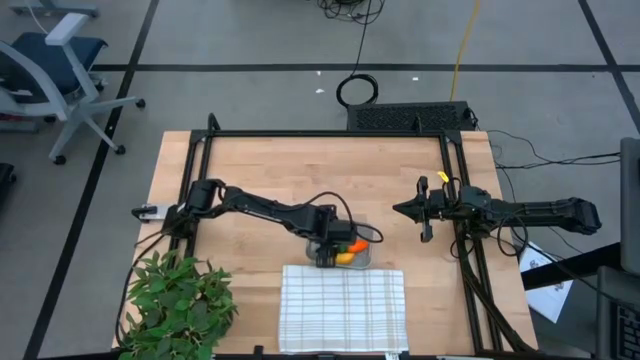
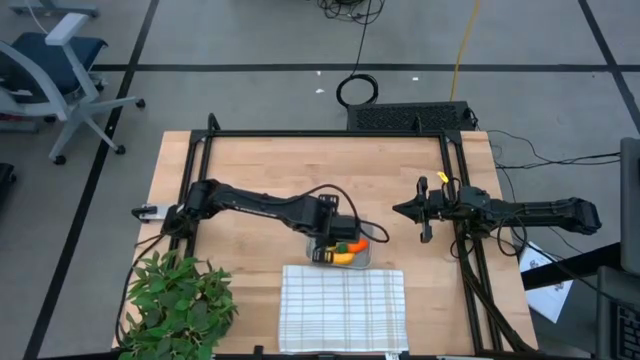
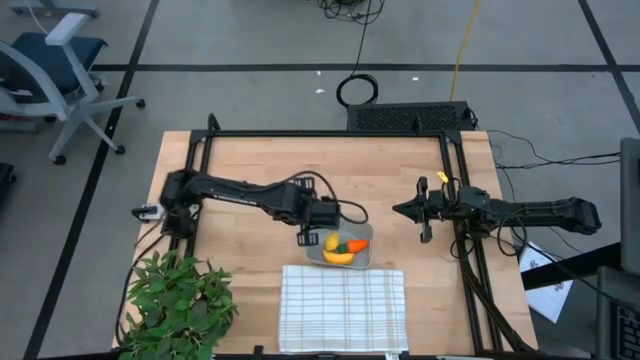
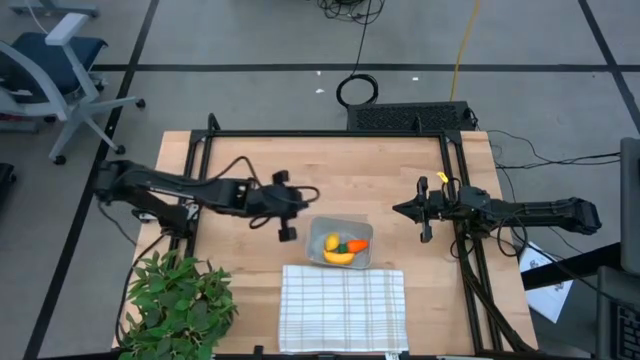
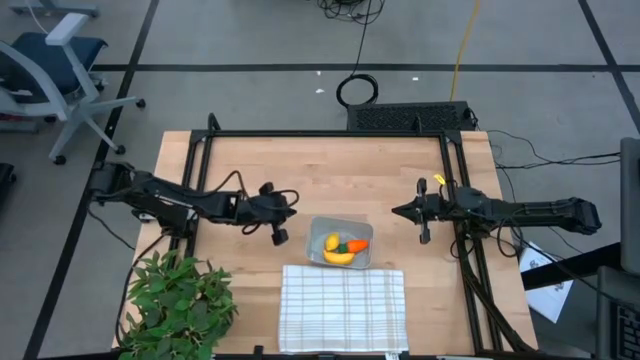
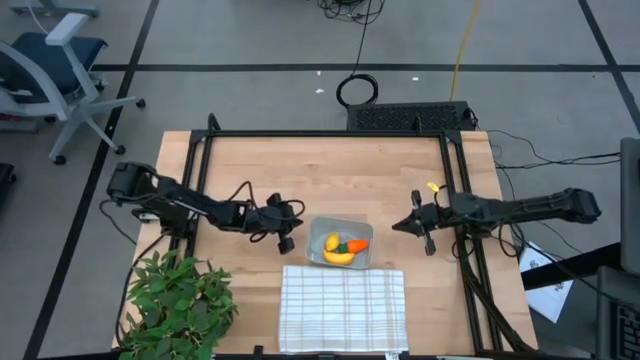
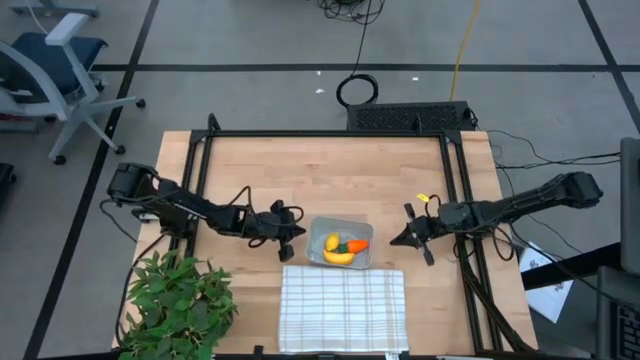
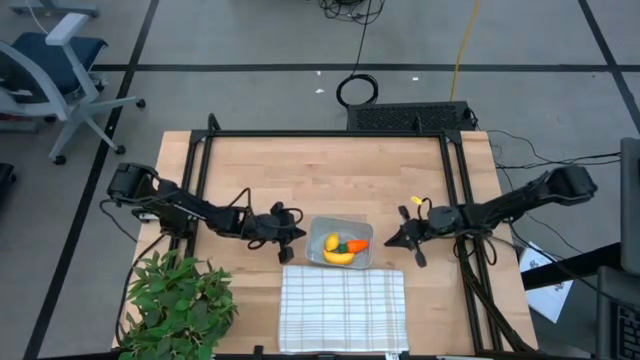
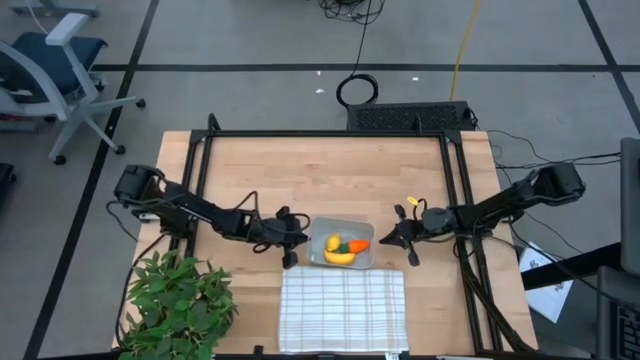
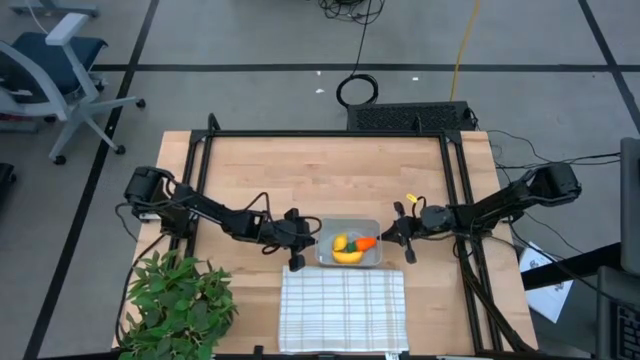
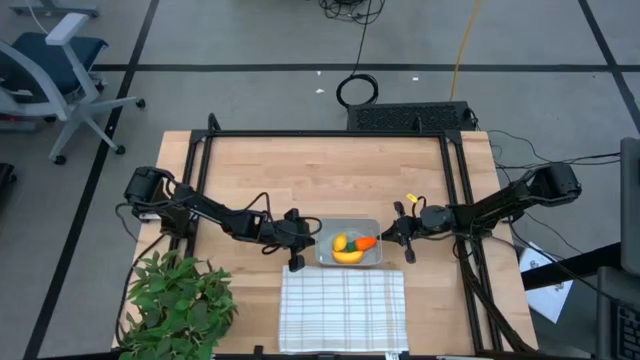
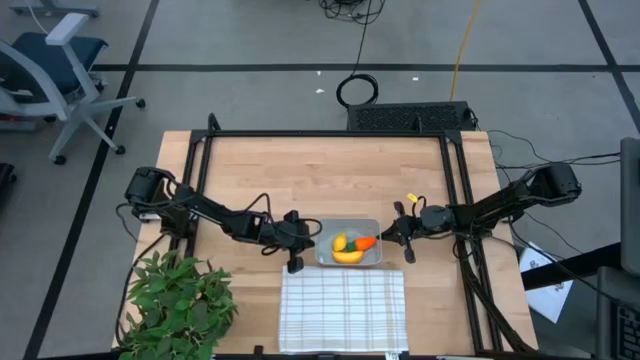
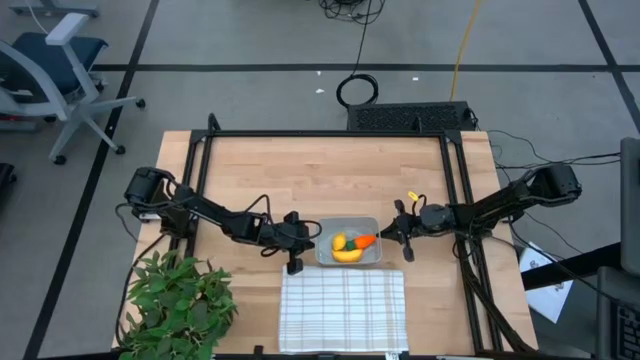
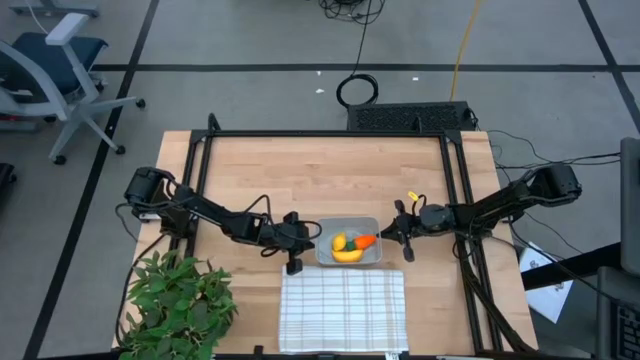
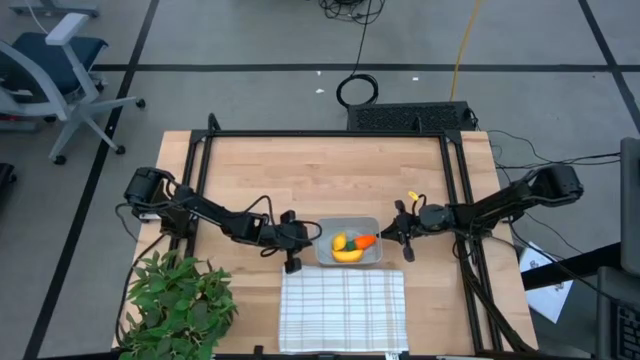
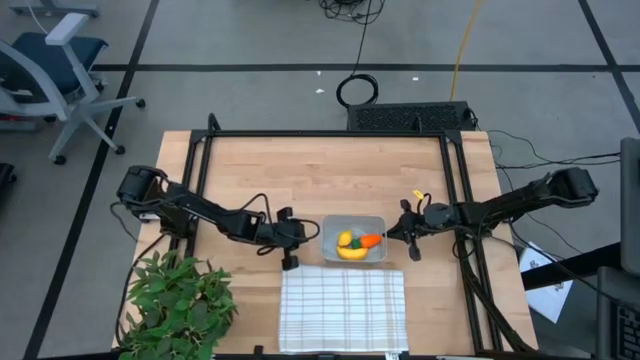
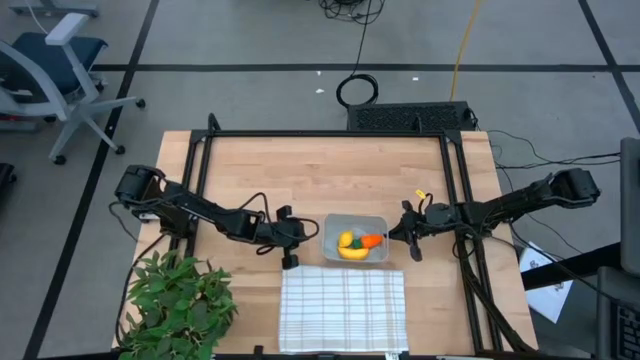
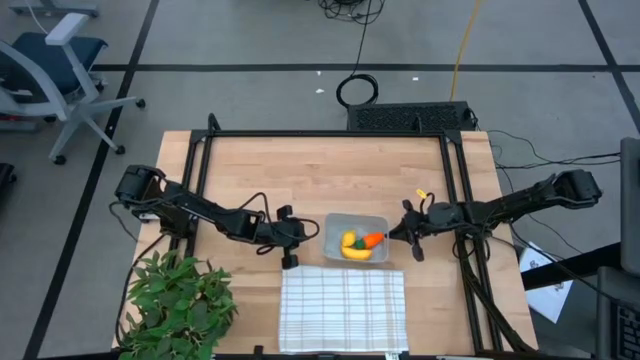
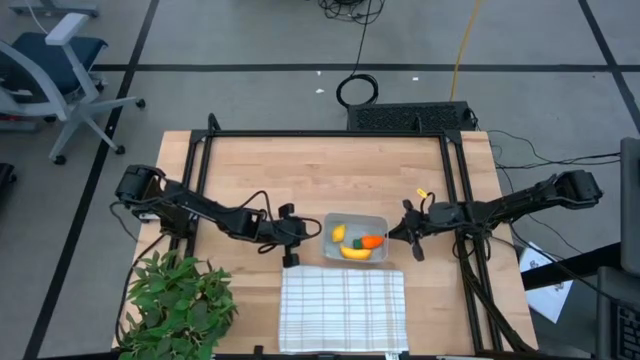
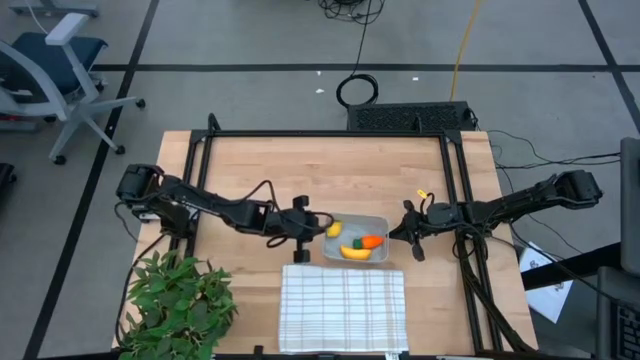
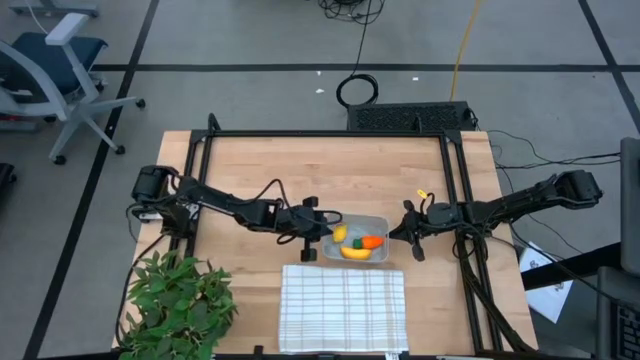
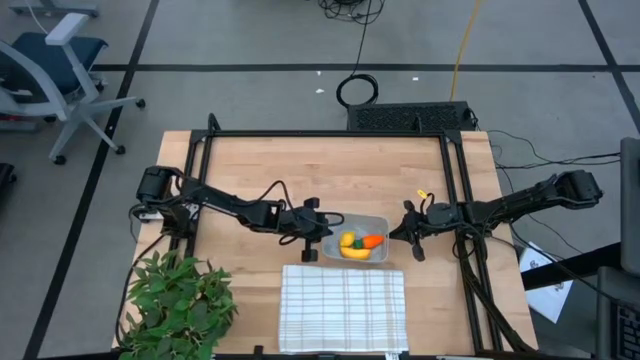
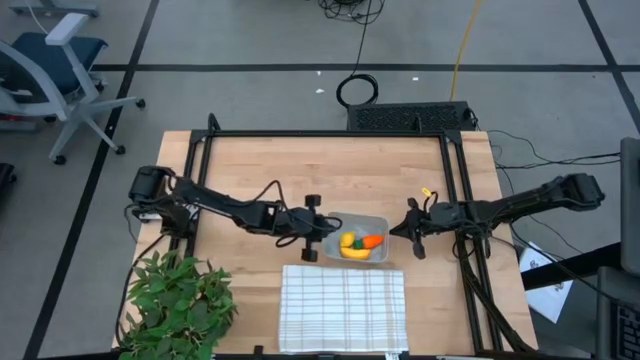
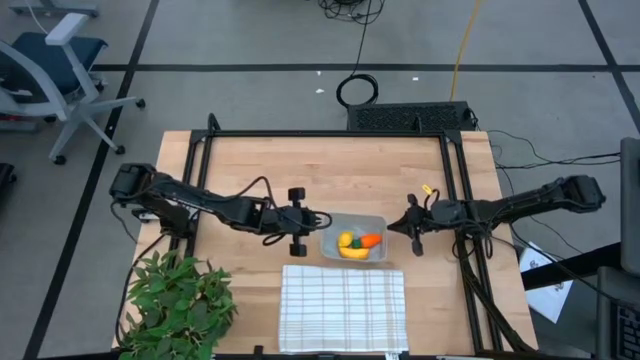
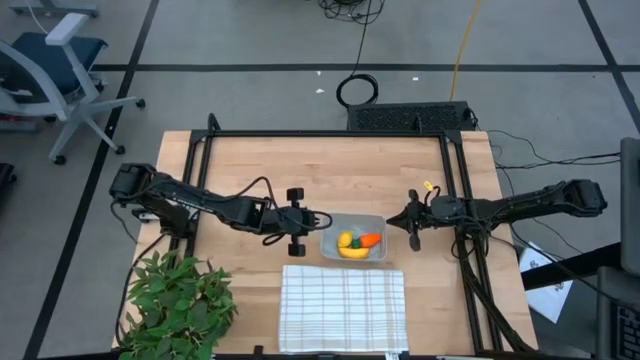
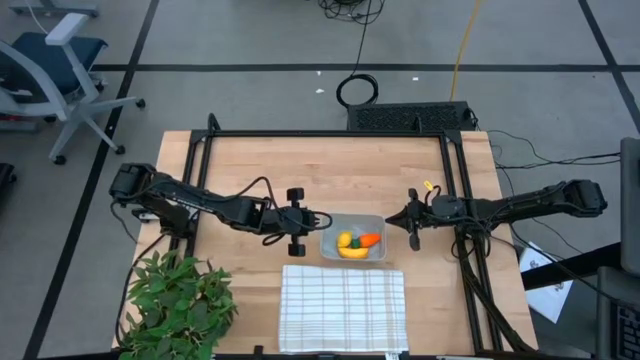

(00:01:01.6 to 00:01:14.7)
Task: Pick and placing Produce into tupperware
Adjust the gray bin

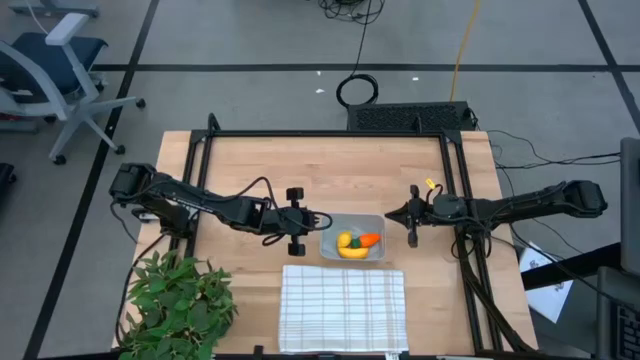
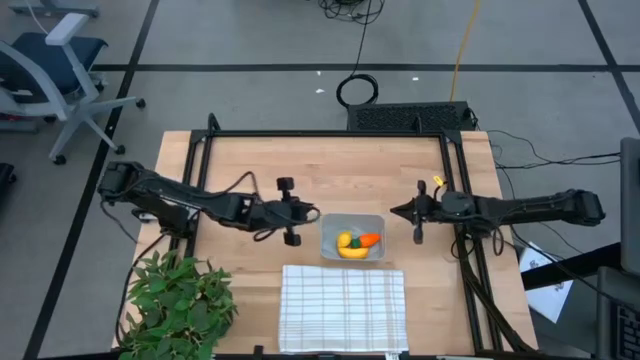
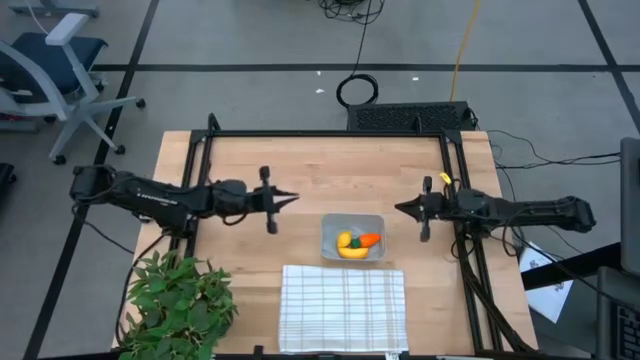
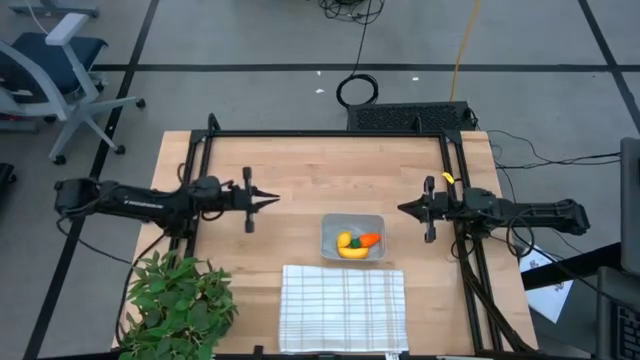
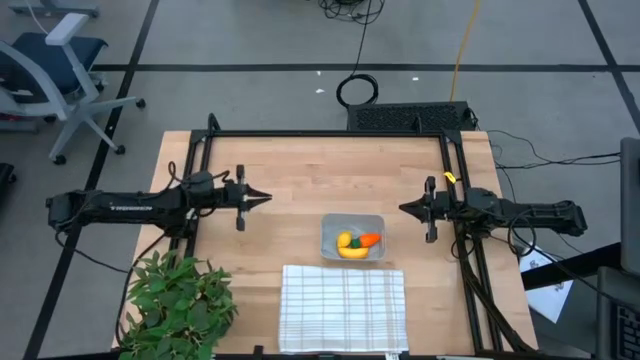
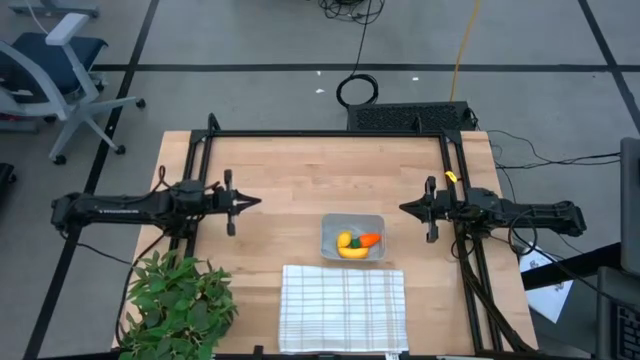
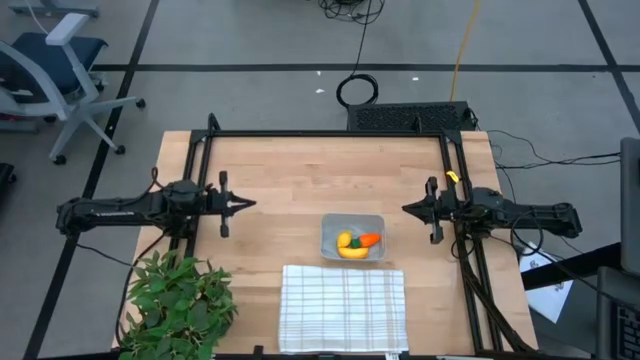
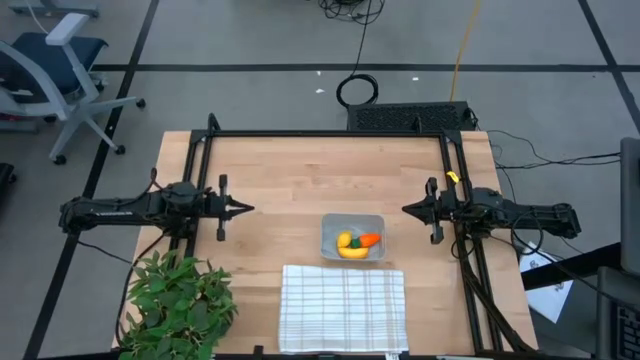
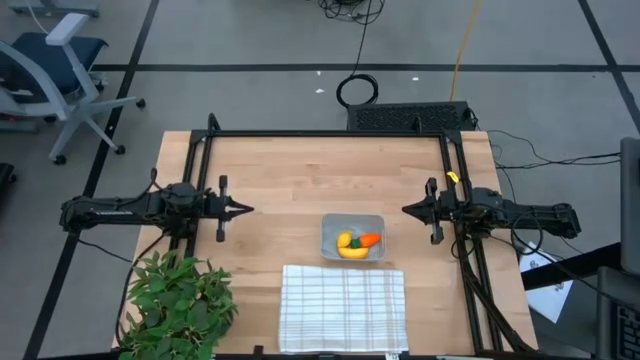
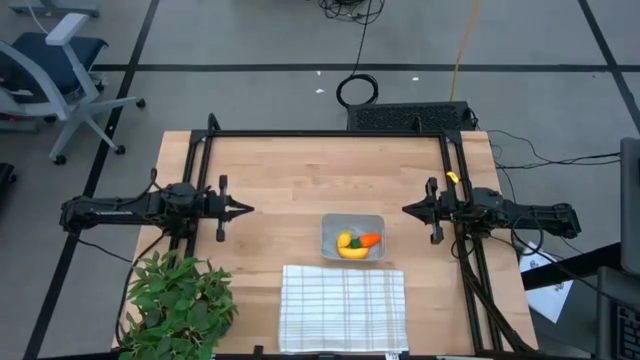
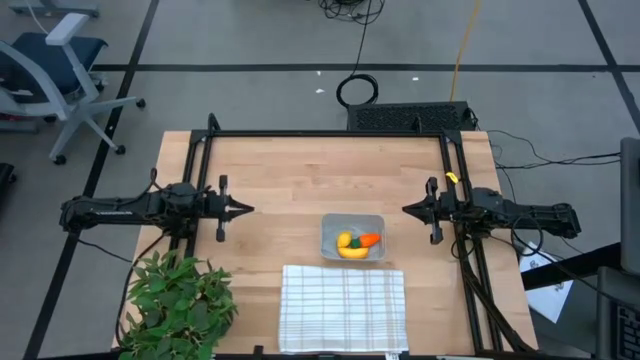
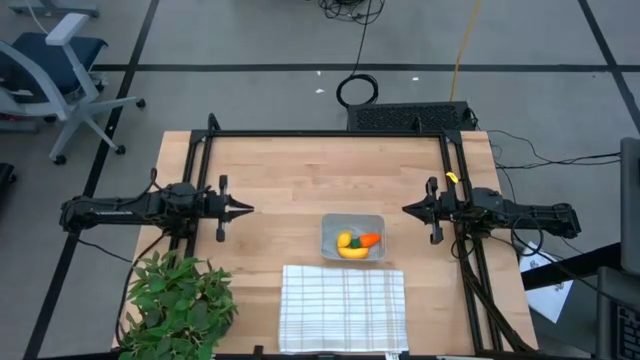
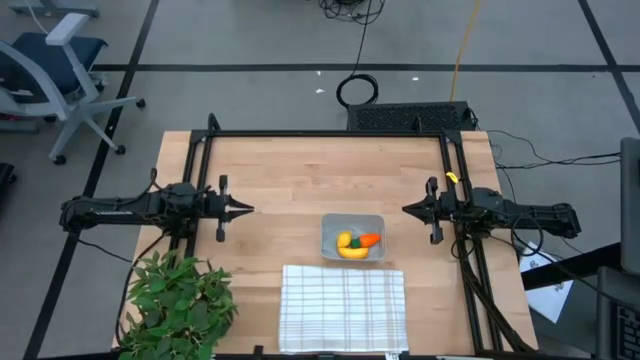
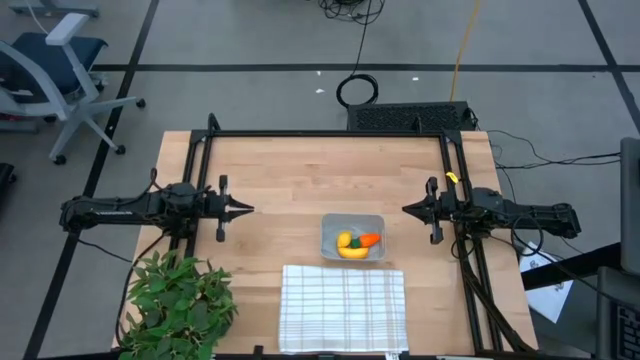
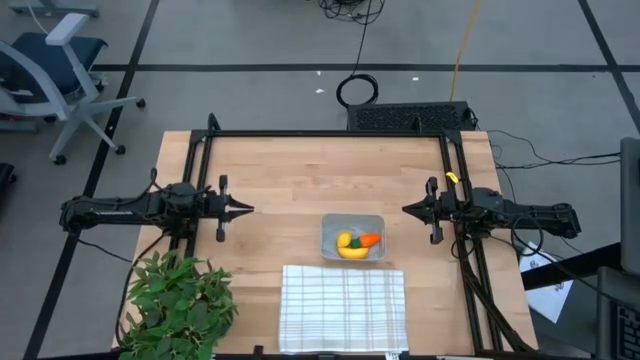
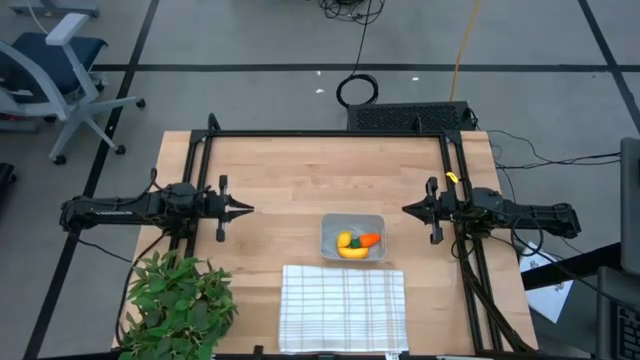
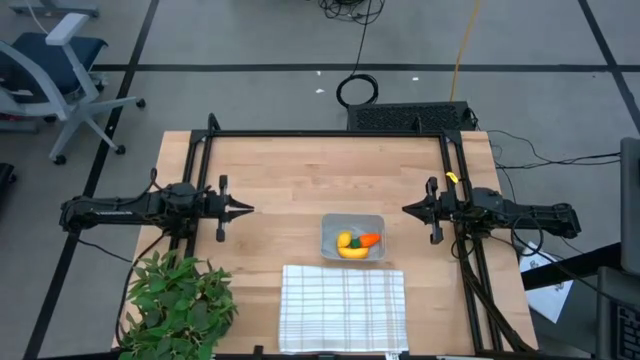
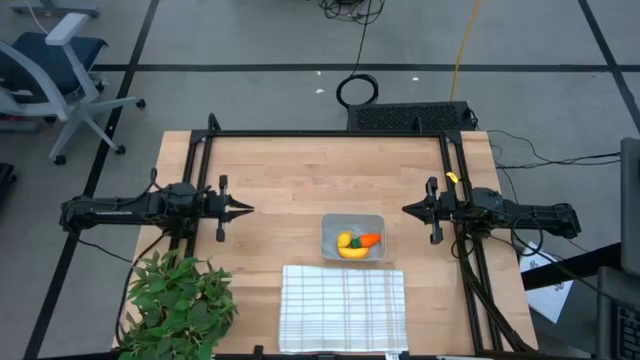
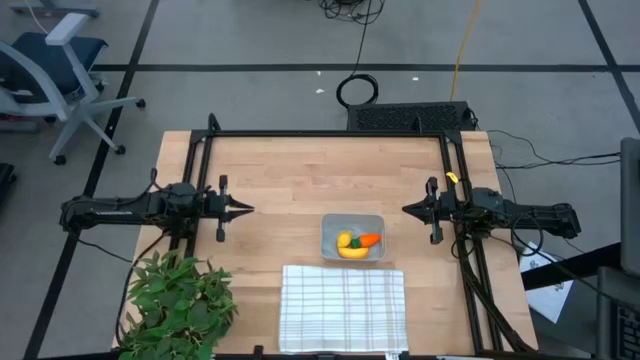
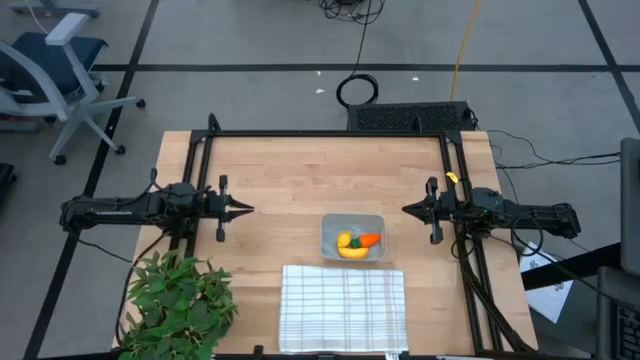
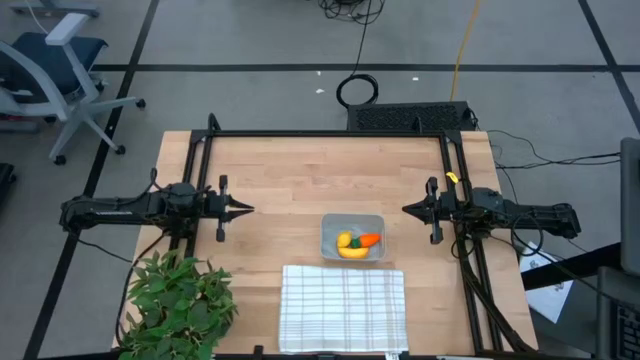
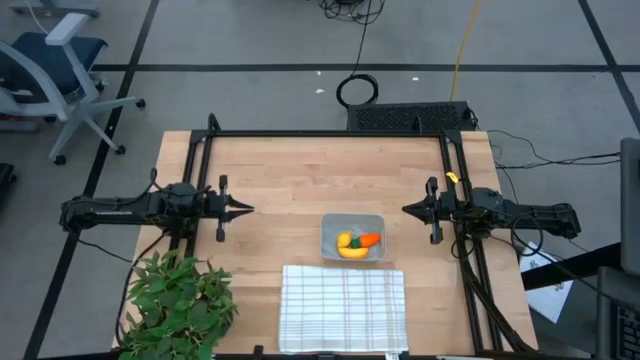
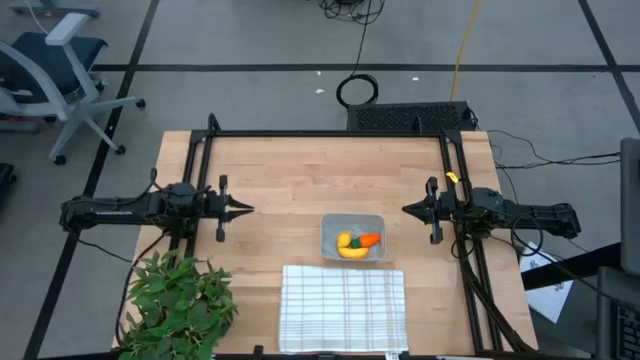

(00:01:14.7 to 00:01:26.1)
Return to Home Position
